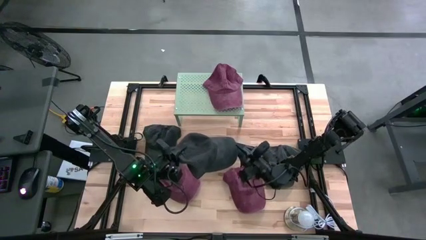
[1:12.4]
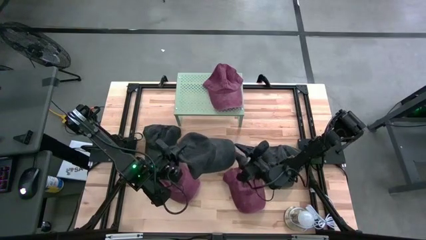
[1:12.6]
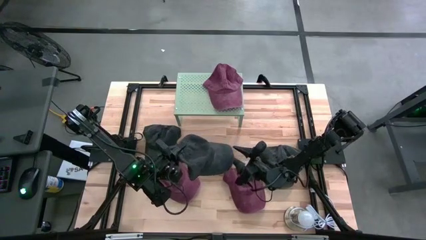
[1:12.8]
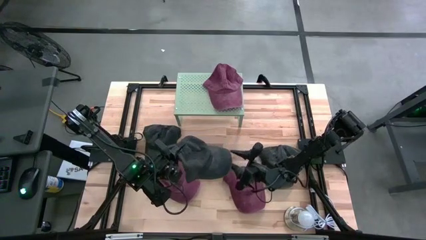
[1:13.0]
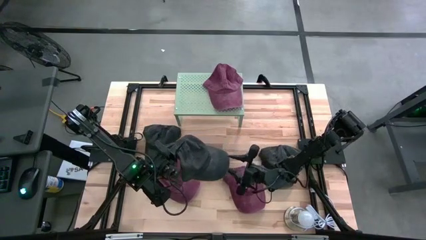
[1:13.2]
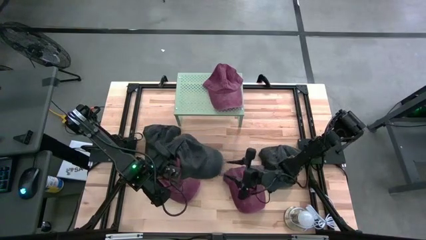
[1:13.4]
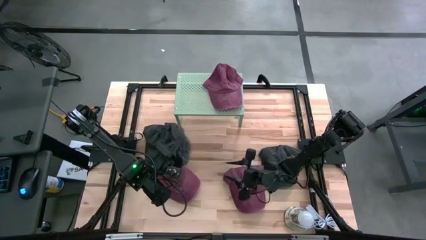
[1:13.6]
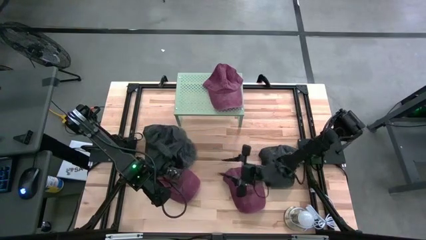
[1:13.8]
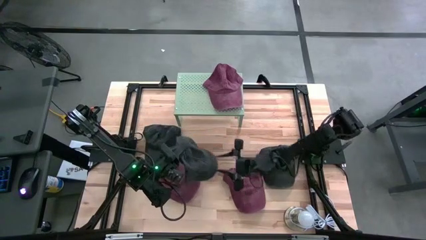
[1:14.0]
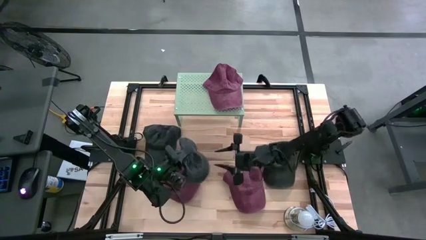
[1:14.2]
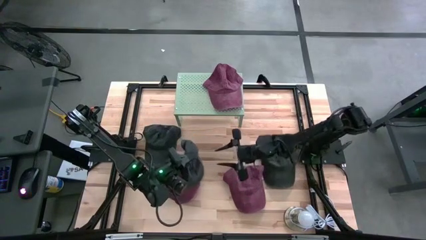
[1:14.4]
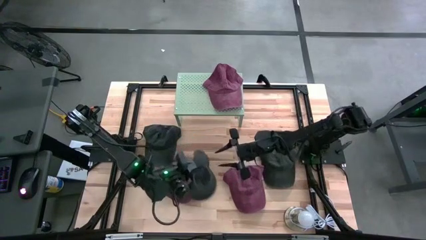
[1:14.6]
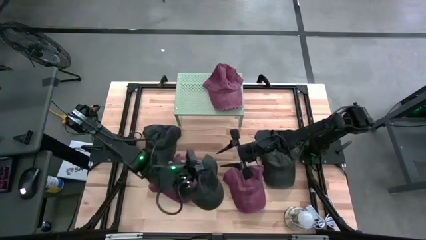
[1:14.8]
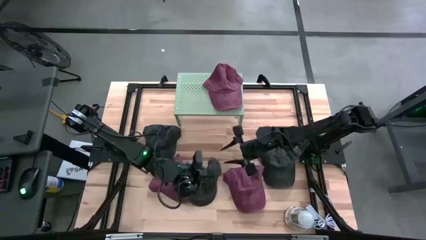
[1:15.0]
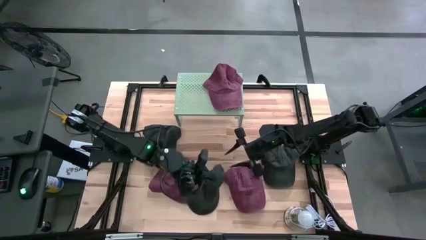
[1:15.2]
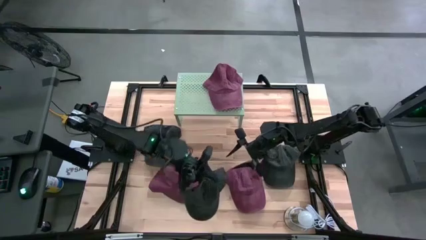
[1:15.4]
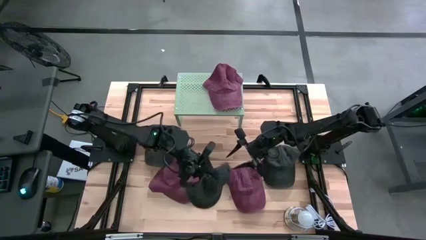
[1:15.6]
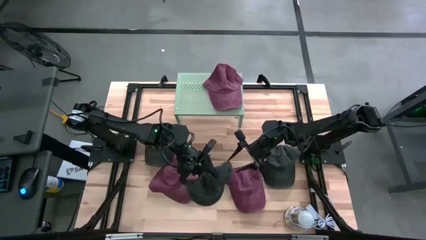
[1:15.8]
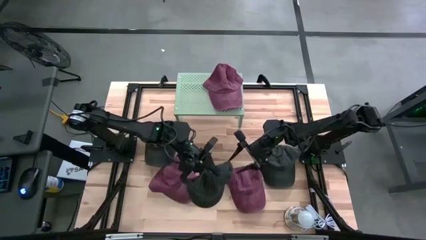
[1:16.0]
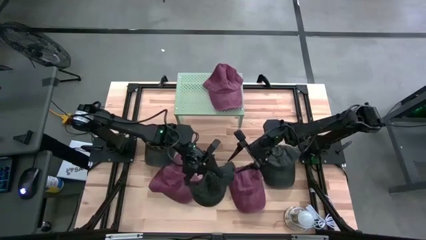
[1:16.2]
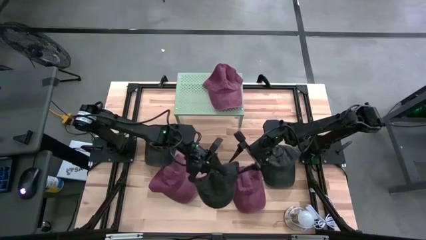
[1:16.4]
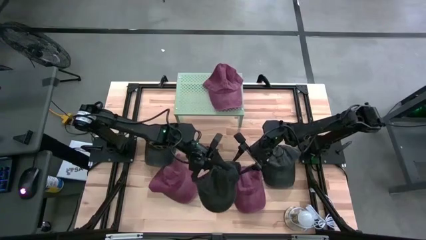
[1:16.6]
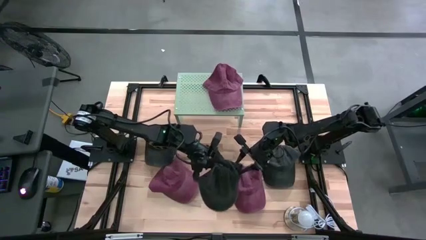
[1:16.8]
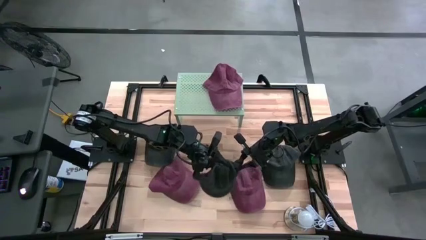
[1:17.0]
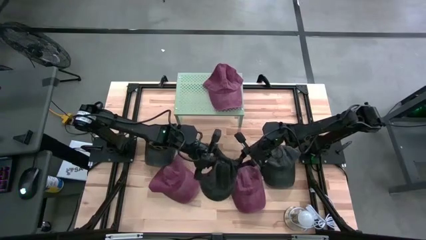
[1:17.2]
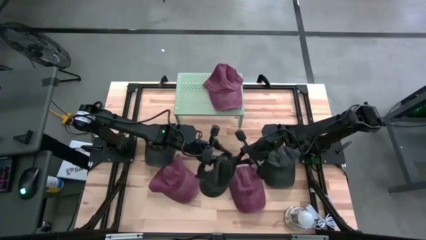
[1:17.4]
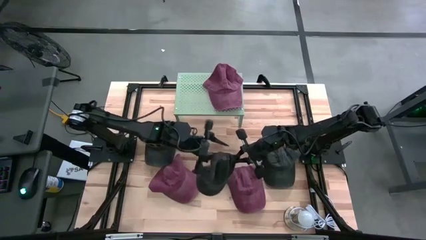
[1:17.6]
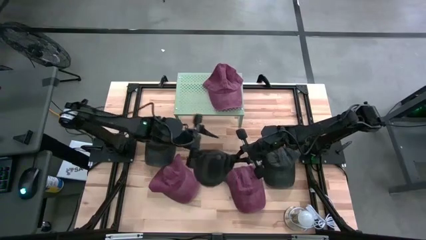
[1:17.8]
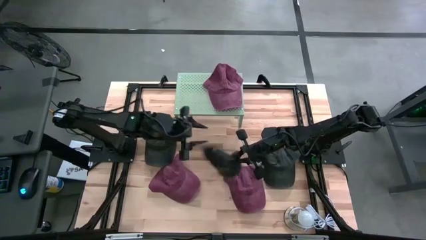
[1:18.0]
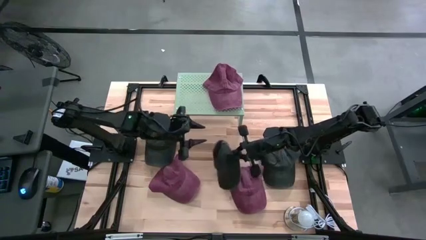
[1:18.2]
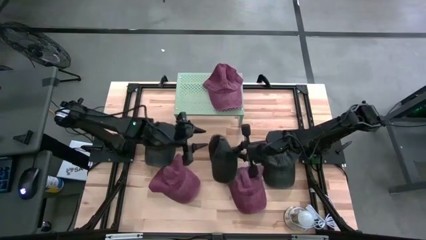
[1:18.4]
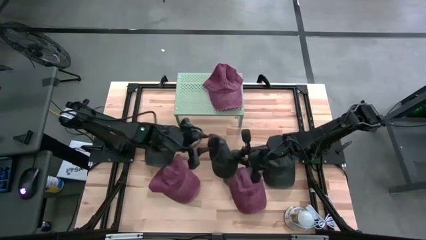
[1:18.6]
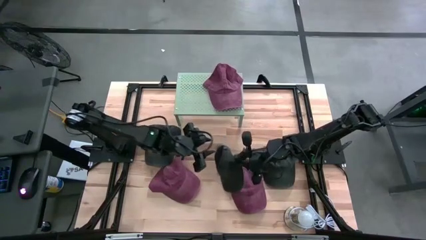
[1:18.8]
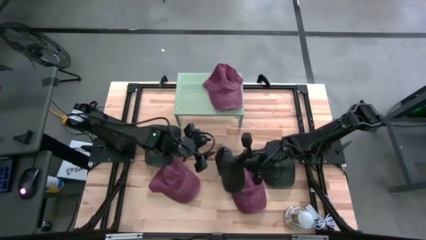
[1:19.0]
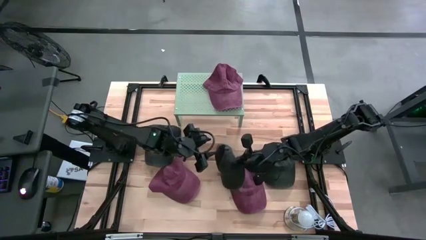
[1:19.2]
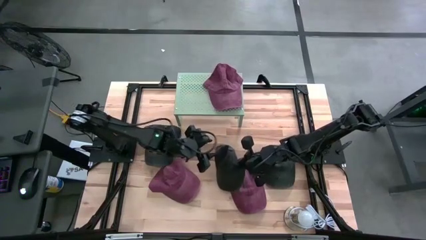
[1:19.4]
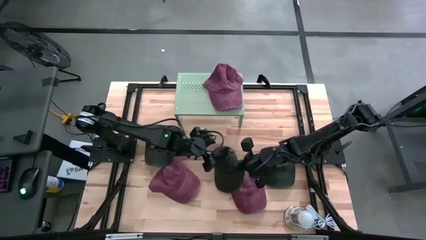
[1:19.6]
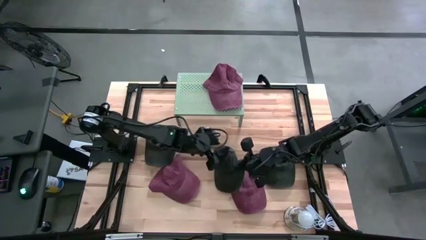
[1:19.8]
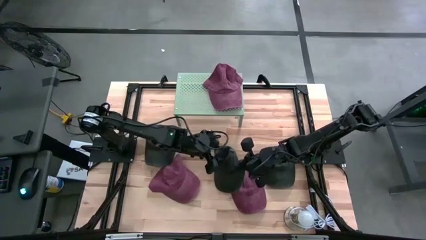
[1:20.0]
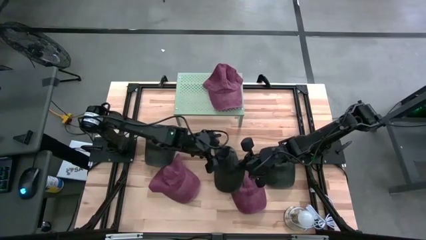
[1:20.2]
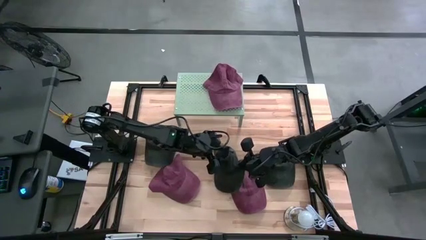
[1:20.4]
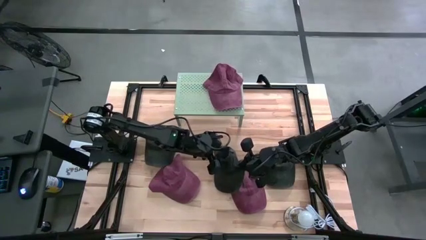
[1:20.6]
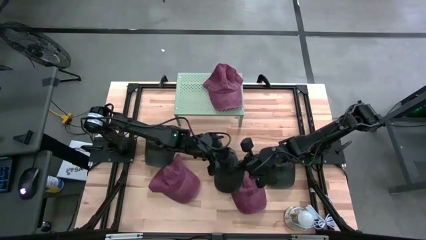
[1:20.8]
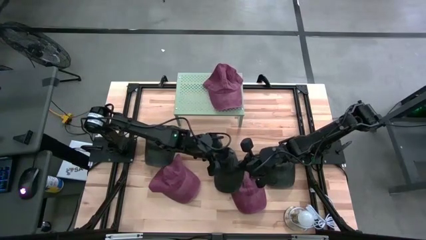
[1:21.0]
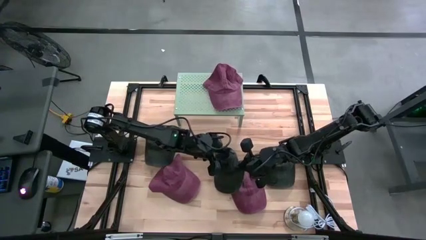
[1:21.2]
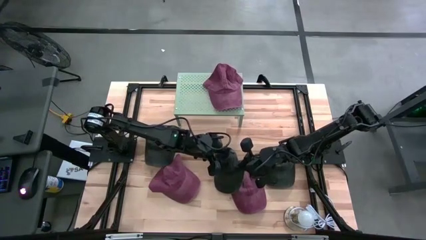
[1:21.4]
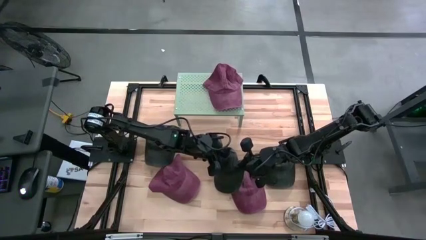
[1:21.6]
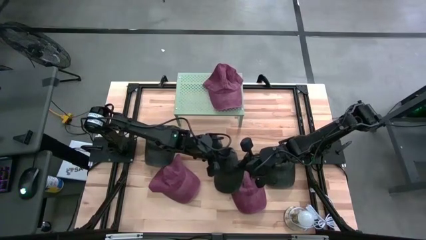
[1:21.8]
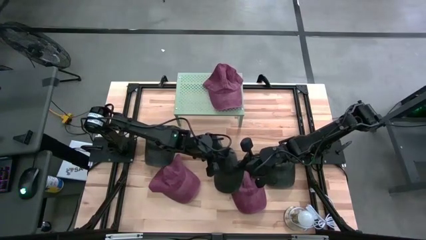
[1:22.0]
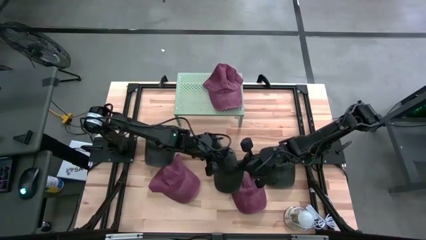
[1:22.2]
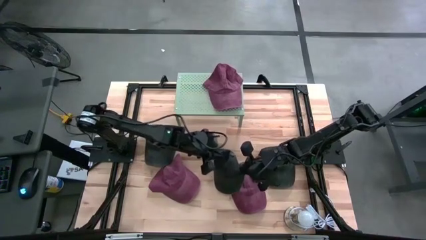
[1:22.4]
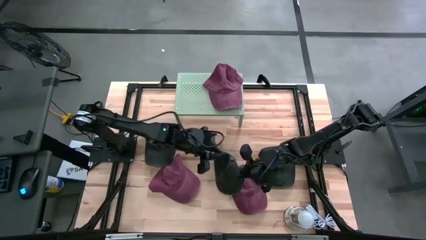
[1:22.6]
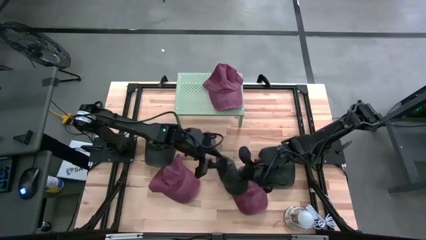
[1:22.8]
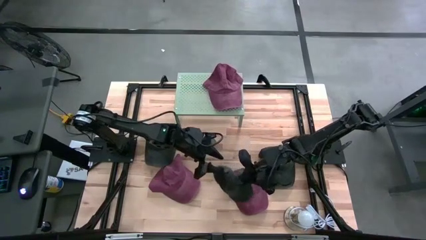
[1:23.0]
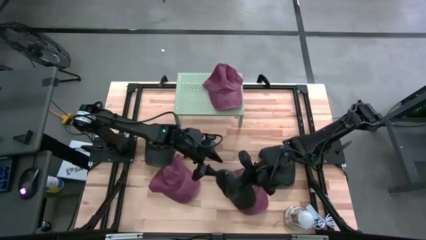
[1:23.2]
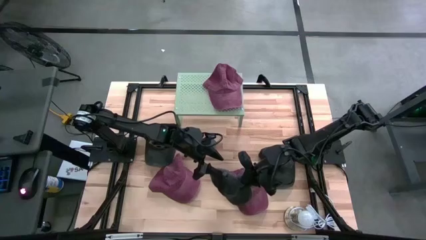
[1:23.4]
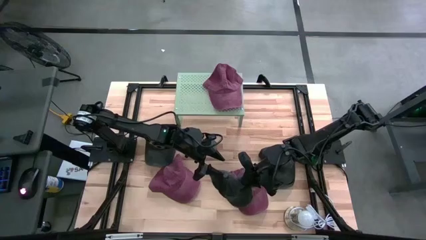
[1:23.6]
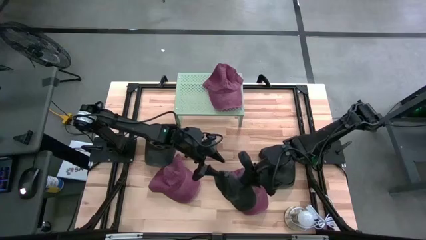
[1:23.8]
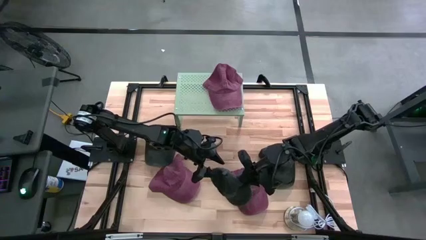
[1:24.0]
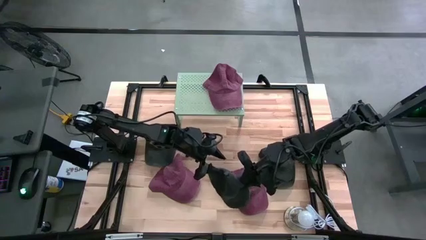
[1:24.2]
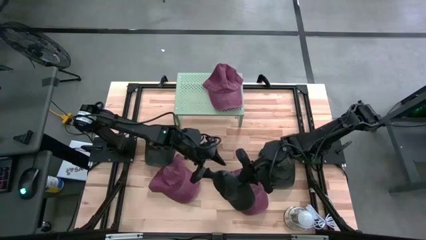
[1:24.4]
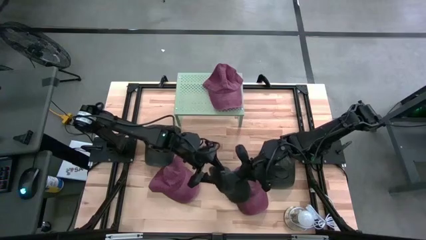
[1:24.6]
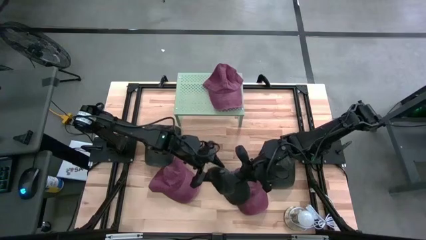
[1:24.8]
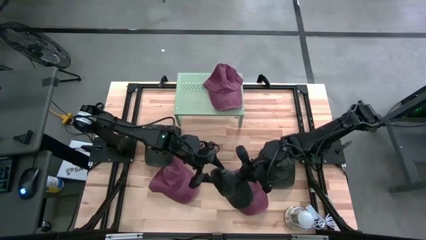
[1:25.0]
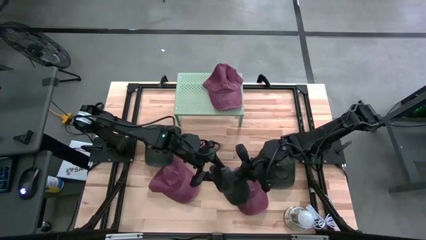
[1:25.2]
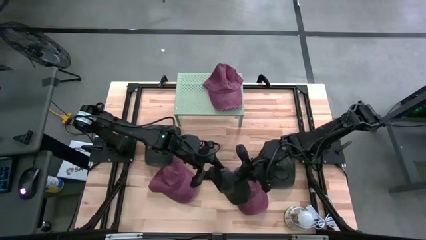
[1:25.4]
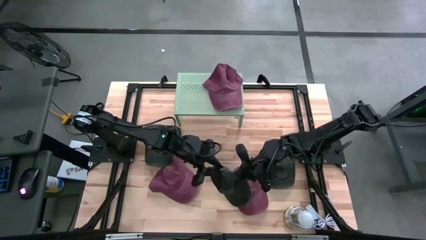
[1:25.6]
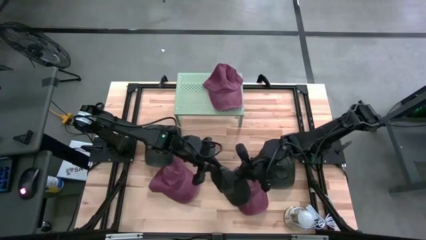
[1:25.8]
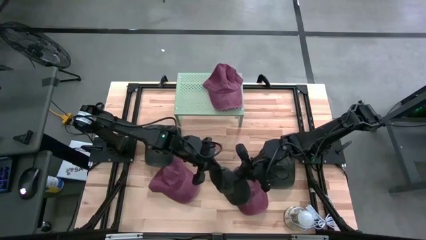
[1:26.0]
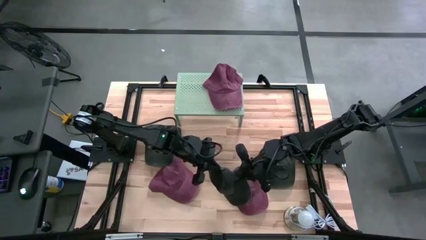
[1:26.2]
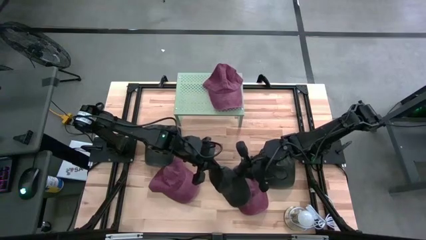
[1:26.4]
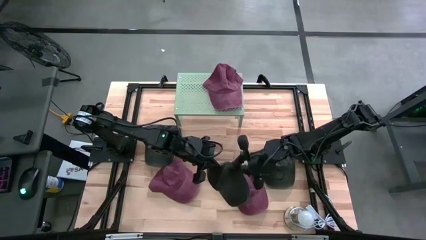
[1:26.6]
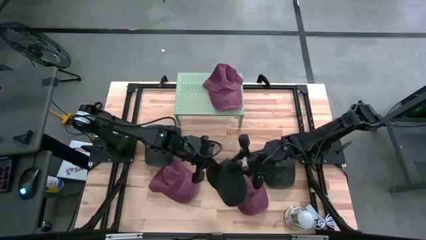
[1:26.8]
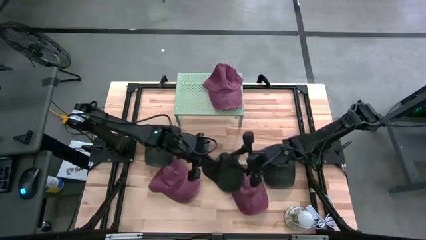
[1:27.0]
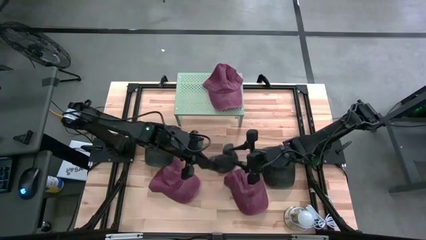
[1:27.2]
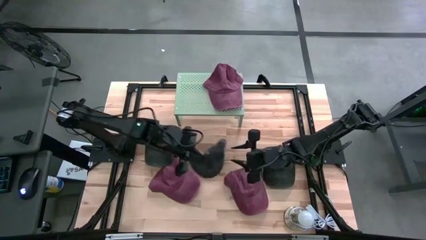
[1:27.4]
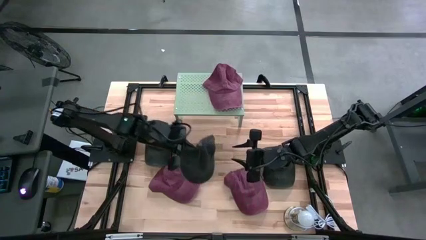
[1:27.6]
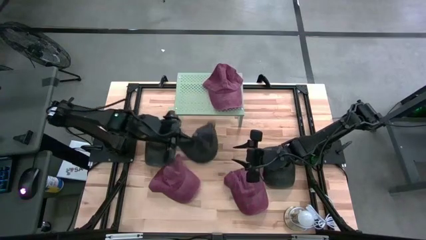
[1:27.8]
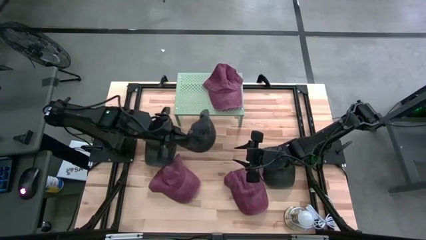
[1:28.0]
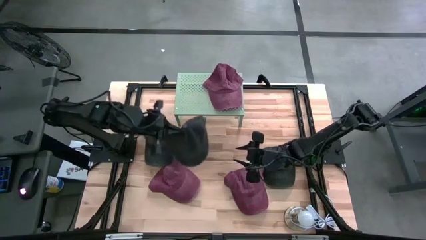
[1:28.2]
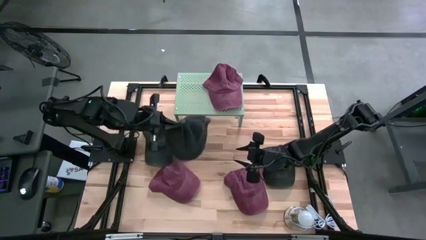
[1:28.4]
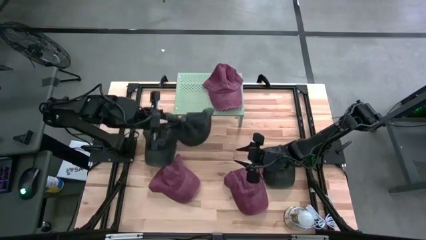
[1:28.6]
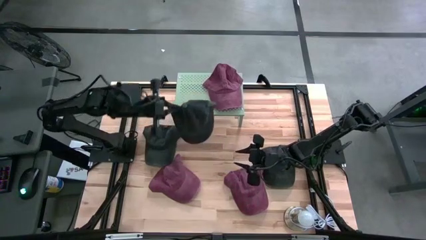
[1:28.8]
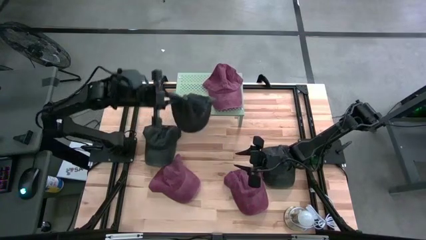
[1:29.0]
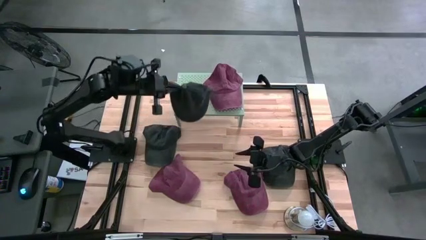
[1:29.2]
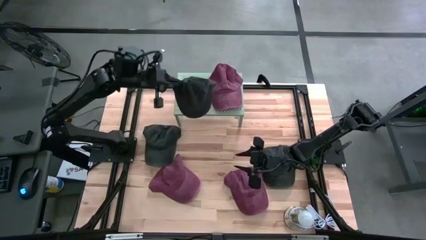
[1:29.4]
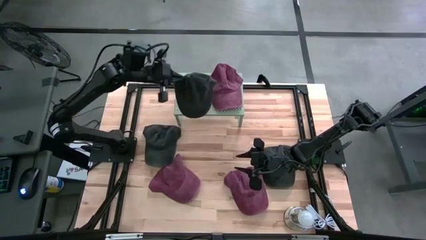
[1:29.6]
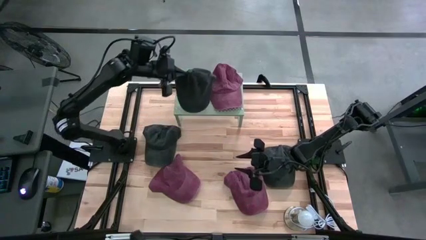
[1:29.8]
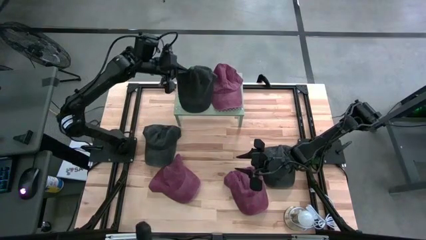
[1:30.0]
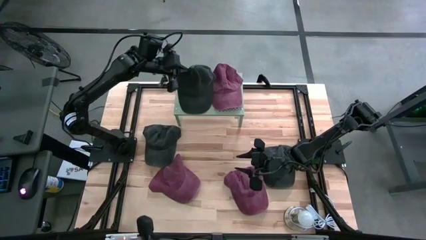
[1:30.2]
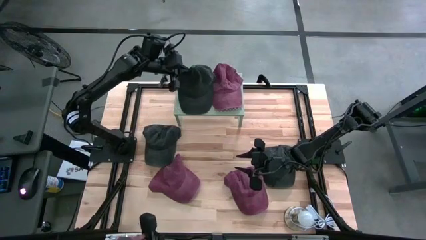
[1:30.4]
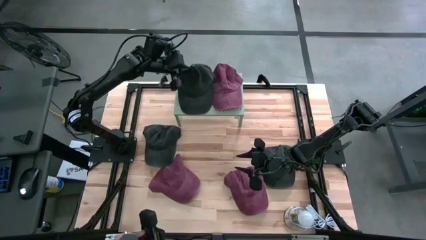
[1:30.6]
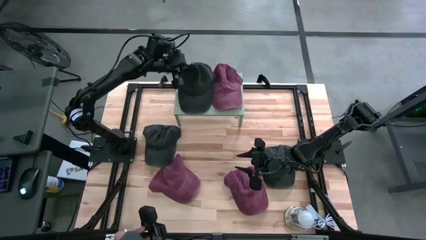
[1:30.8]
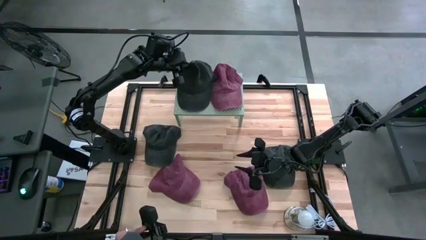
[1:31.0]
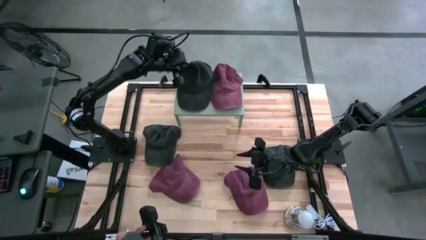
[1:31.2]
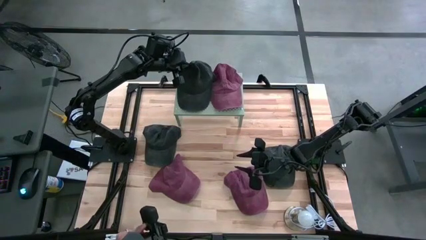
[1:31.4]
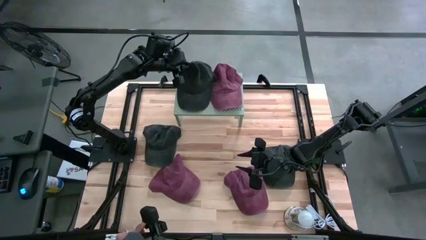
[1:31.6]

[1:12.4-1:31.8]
Task: Pick & Place hat
Put the top left black cap on the left side of the shelf
